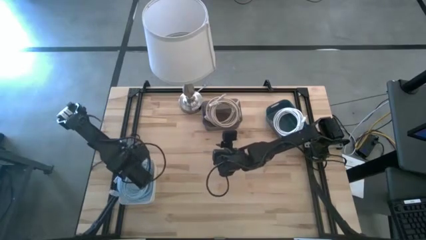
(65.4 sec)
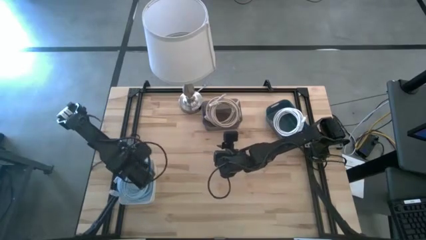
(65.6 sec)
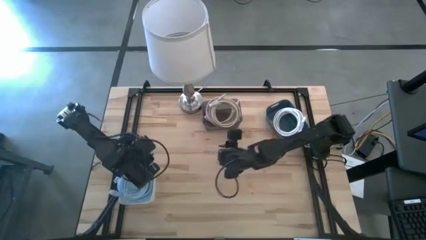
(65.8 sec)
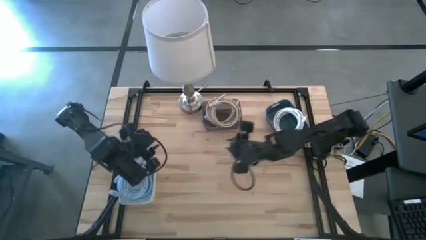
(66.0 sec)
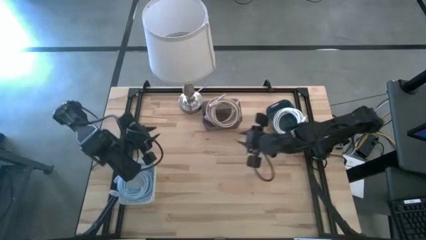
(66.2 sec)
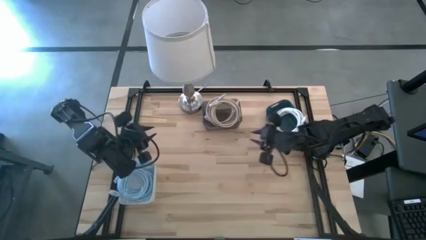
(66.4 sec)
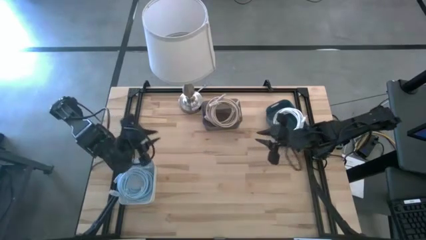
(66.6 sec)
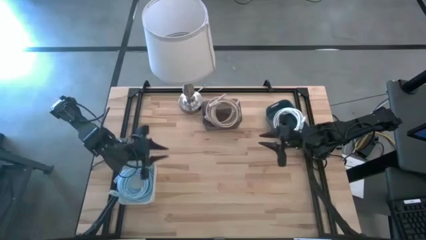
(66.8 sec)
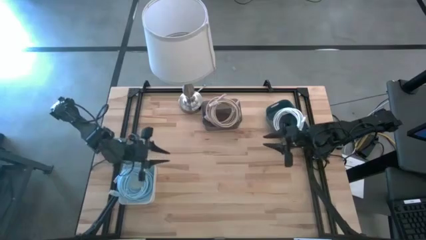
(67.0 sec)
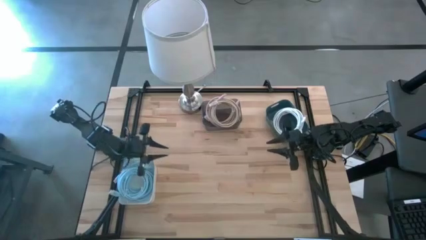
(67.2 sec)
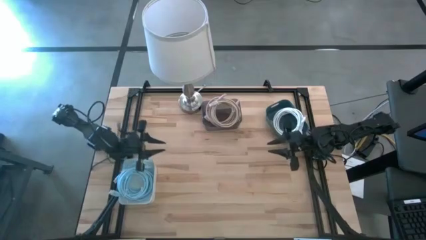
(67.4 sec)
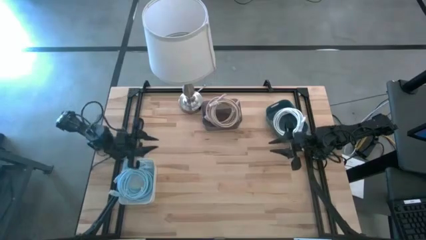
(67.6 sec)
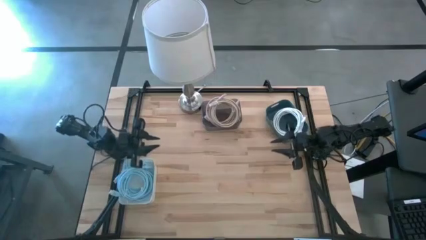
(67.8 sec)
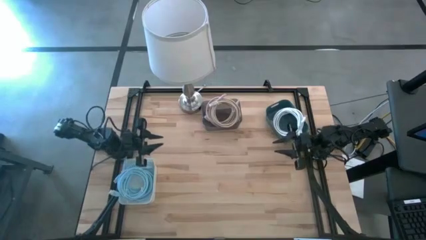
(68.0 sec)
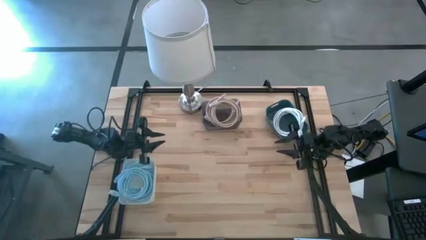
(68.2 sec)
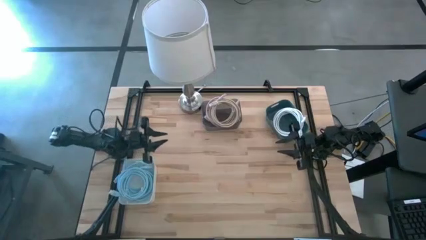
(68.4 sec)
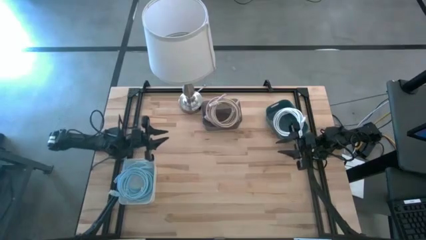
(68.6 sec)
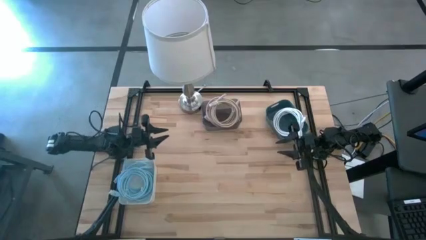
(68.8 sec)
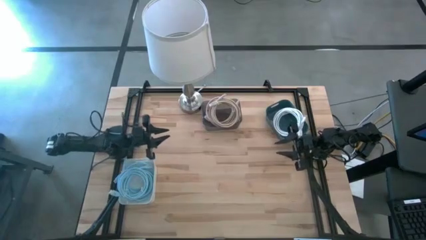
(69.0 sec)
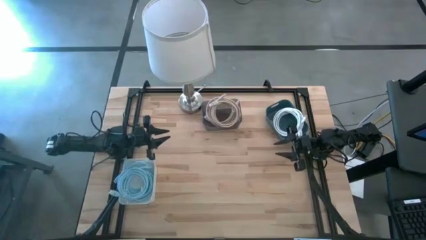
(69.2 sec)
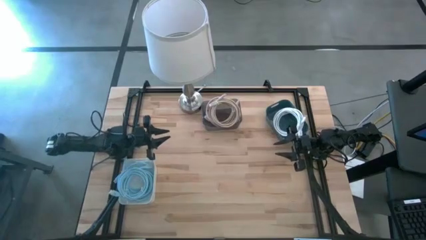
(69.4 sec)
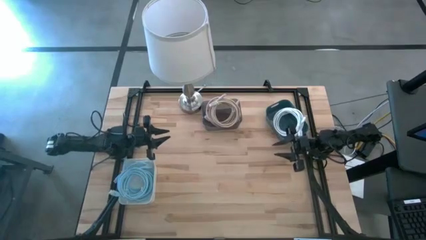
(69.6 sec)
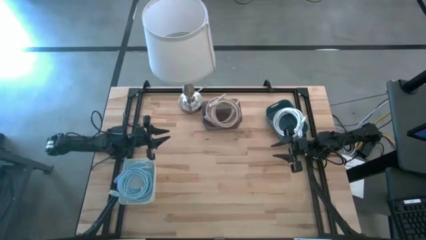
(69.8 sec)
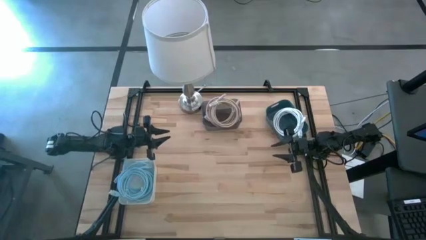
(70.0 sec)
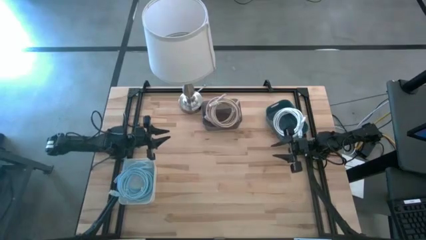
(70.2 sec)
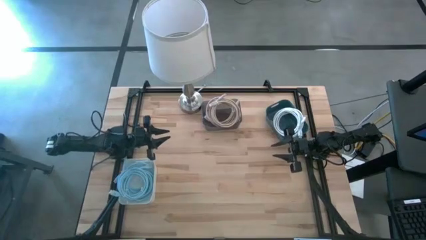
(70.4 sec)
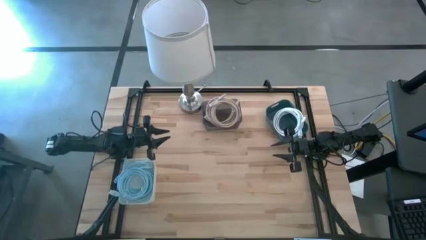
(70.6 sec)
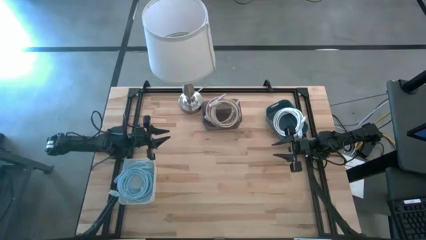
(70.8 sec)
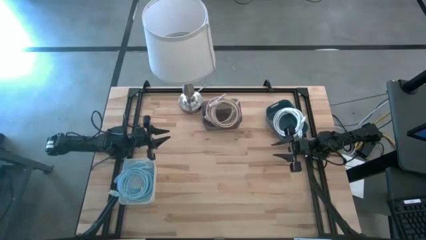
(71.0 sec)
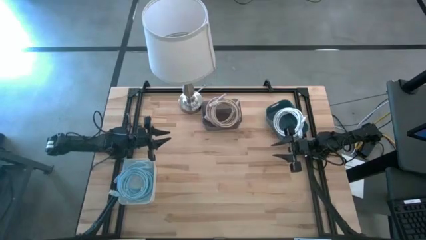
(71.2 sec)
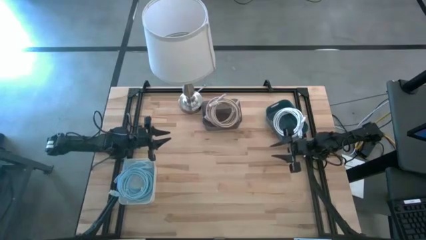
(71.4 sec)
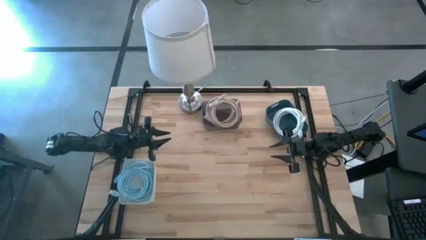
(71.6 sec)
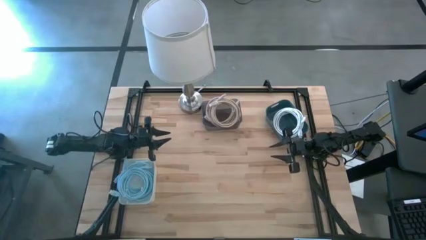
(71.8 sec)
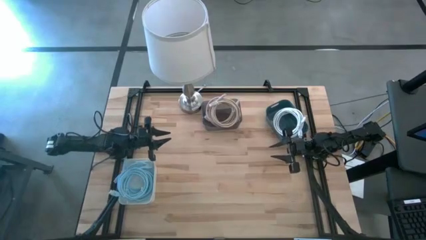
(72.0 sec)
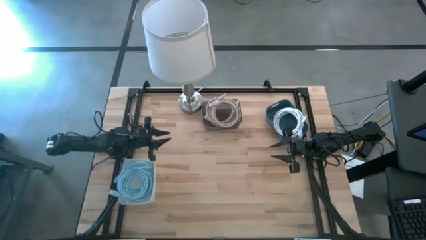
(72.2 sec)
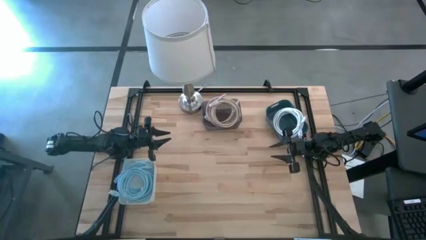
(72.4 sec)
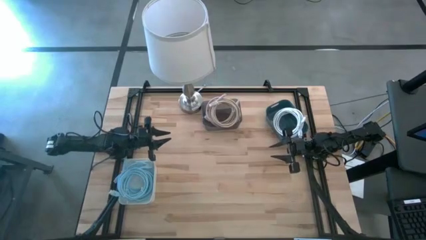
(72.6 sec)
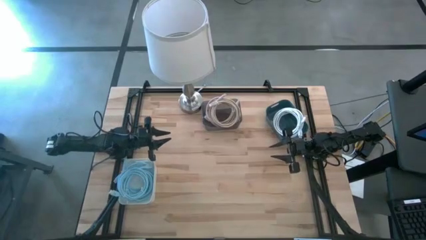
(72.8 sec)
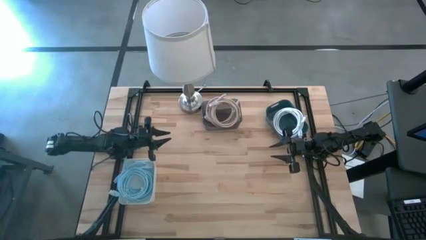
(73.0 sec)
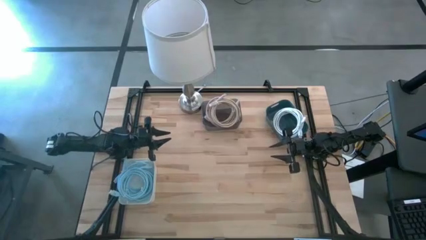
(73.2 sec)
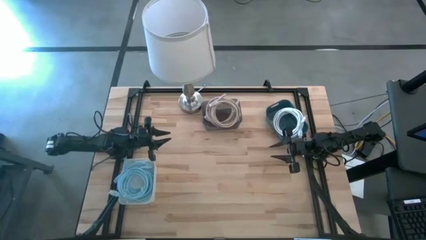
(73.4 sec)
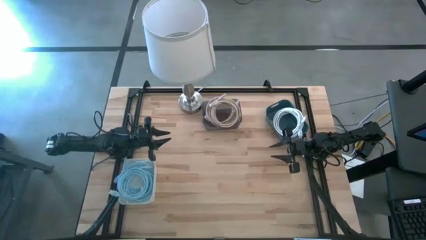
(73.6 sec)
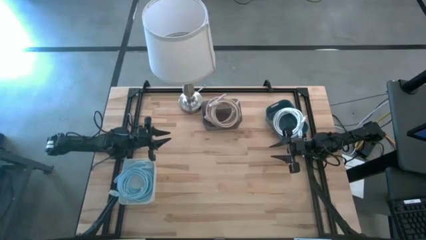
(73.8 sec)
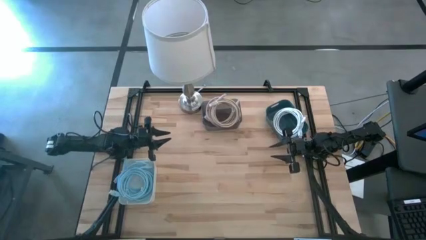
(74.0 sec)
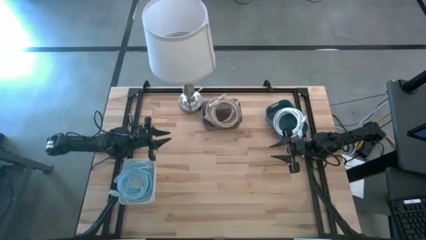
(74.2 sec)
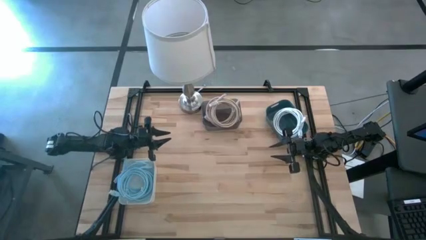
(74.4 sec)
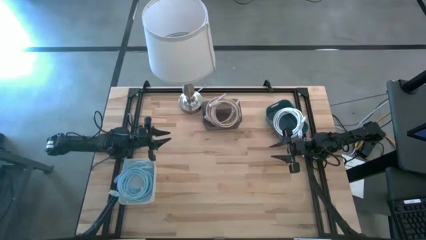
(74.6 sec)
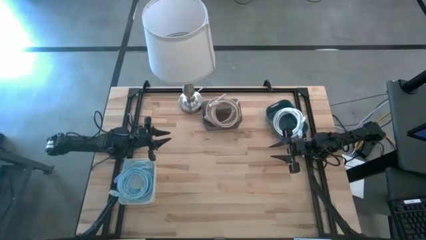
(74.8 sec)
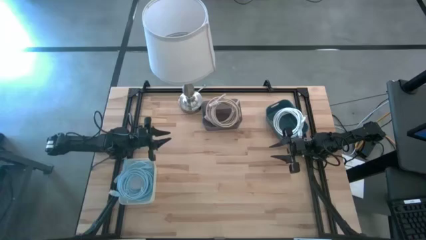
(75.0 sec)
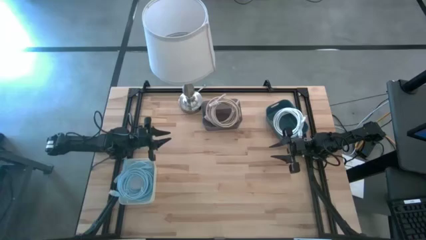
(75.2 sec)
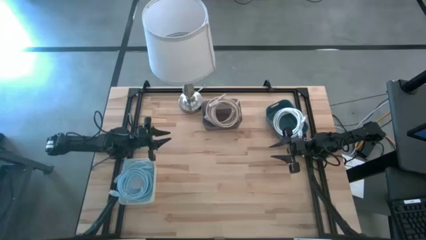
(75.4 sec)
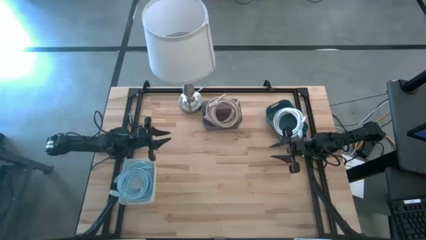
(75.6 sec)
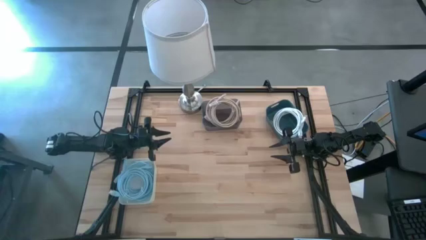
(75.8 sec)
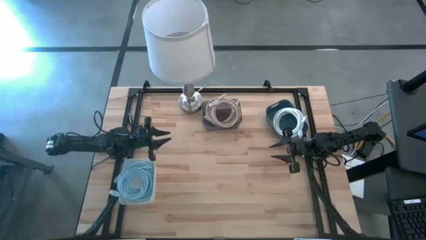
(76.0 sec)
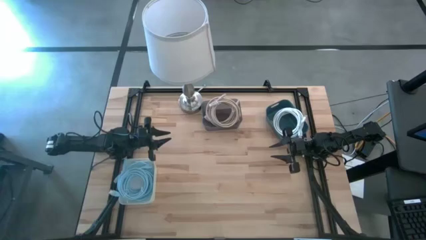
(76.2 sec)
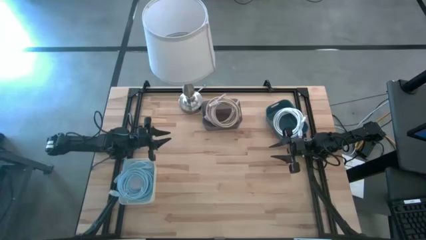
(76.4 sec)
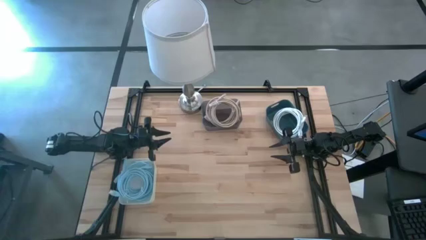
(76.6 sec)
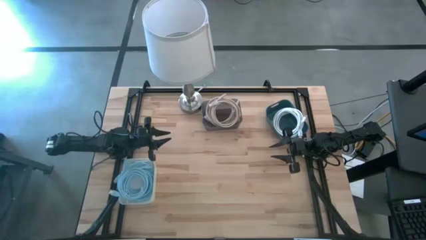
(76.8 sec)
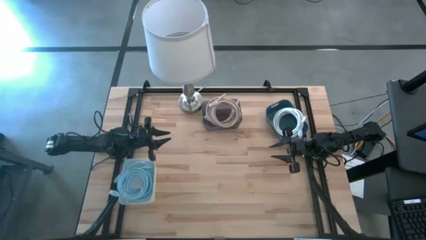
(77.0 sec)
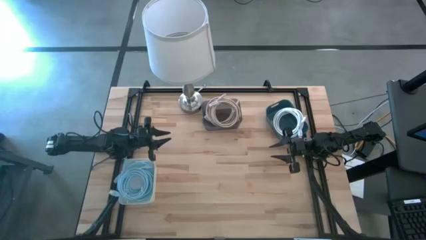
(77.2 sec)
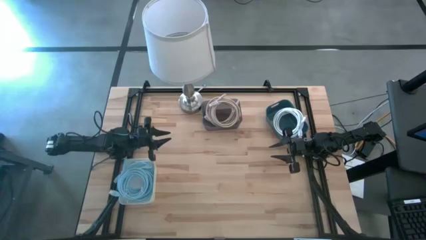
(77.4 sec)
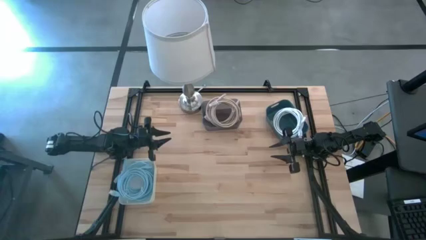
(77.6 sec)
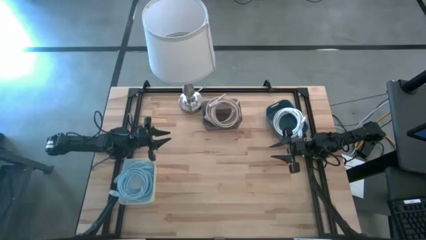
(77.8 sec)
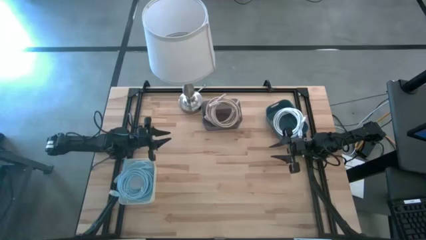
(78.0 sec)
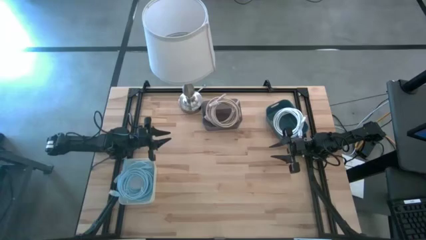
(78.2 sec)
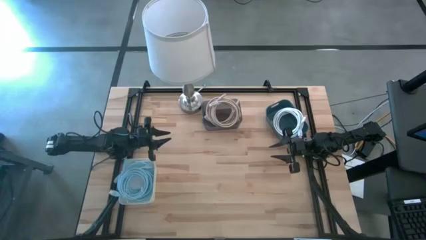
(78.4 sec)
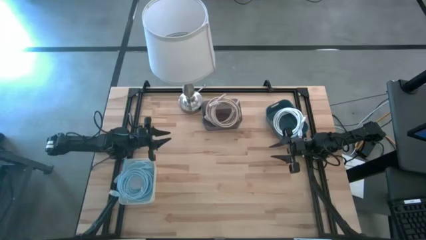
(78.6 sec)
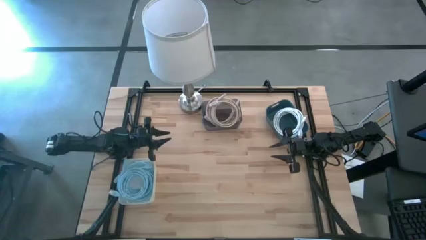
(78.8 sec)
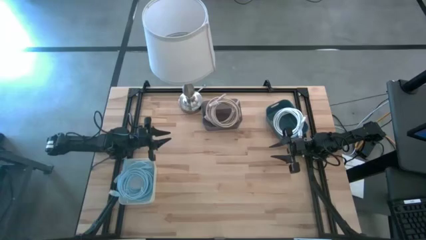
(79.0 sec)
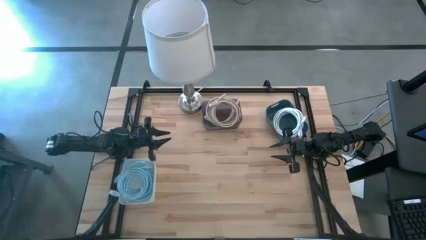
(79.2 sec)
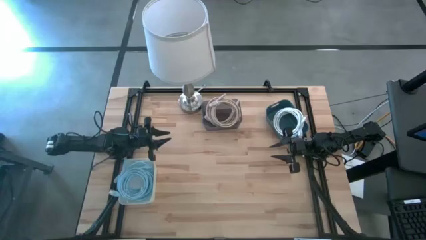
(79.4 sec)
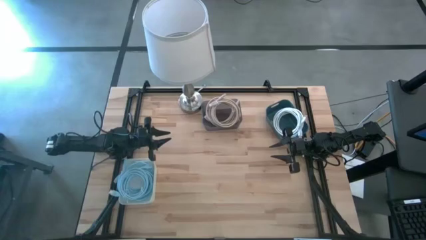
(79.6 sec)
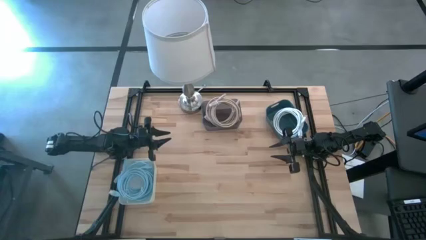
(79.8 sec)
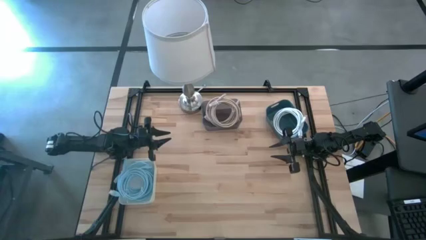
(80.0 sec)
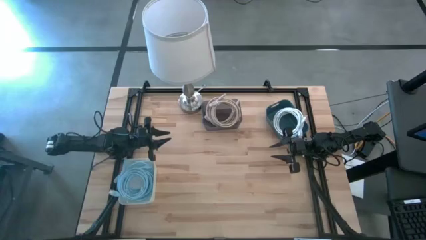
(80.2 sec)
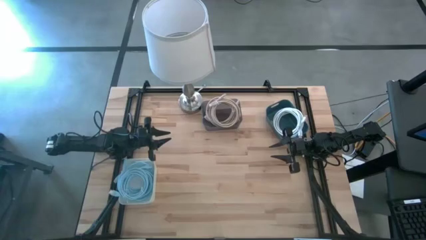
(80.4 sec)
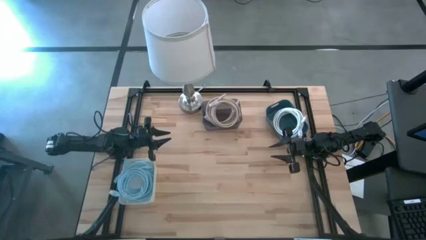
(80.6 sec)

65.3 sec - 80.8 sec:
Task: Sort HDMI cables
Return to Home Position
